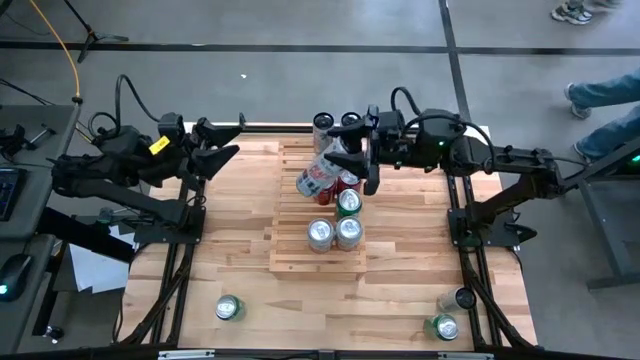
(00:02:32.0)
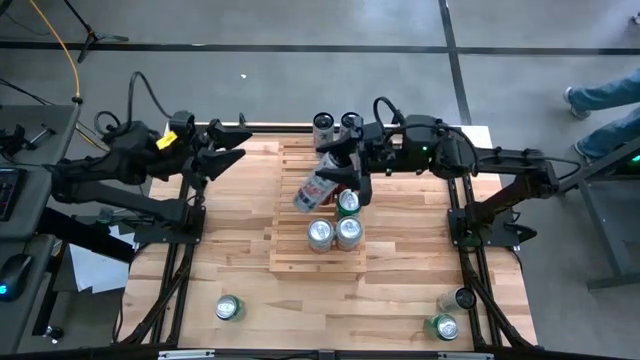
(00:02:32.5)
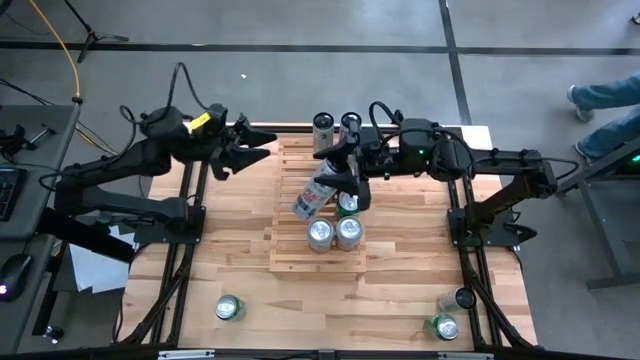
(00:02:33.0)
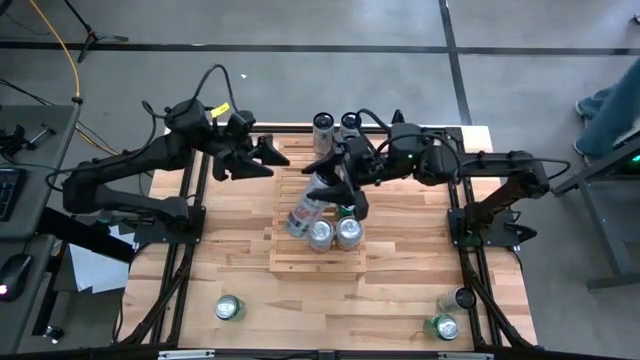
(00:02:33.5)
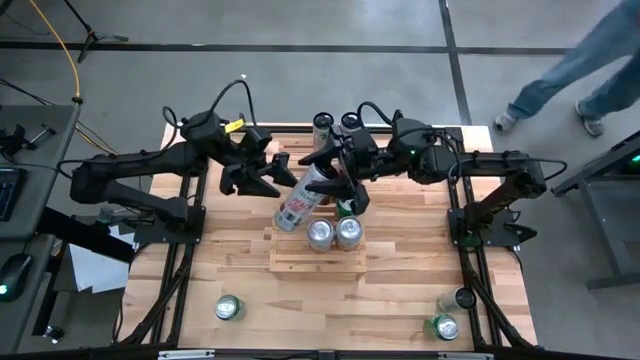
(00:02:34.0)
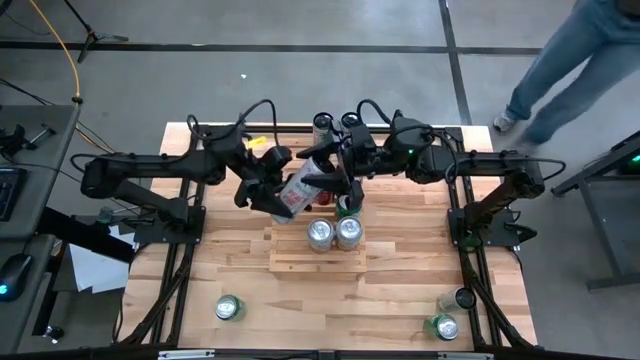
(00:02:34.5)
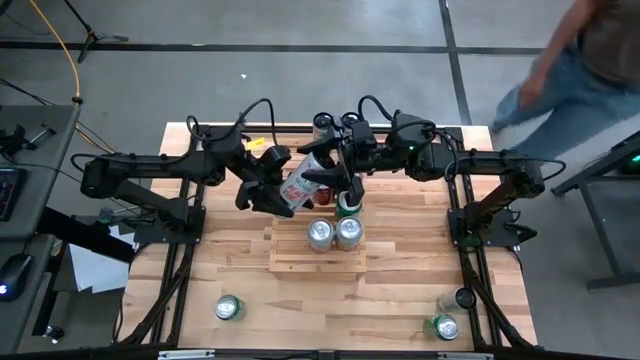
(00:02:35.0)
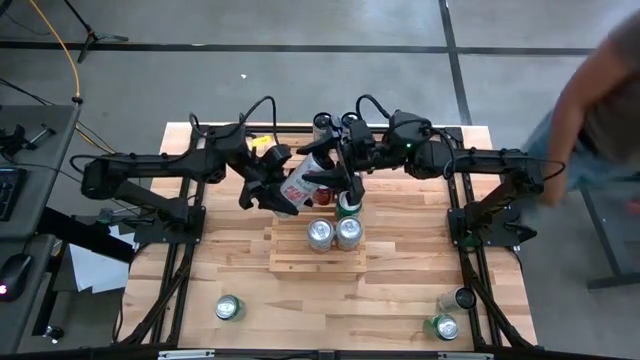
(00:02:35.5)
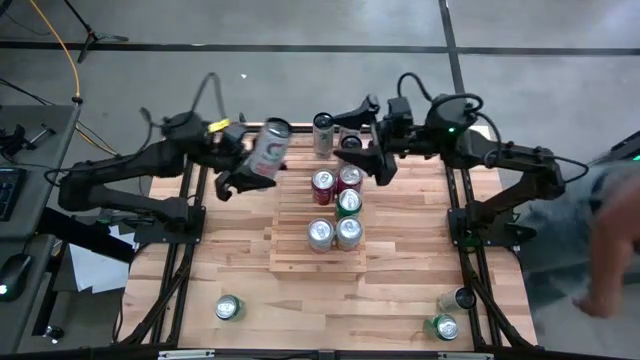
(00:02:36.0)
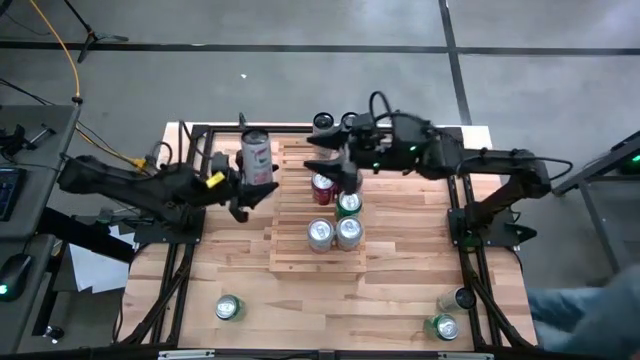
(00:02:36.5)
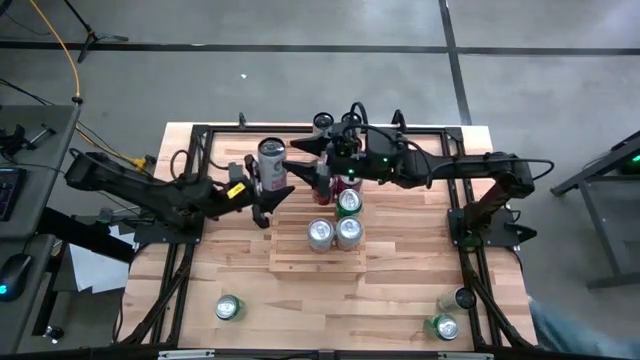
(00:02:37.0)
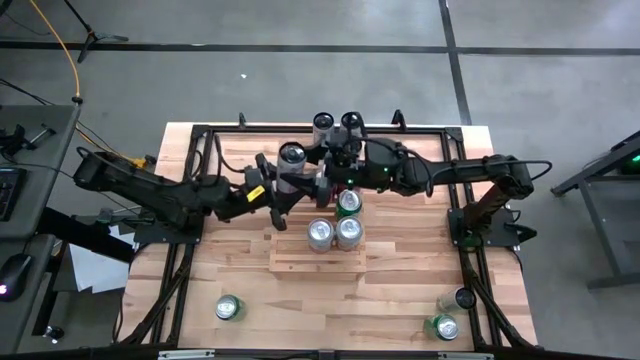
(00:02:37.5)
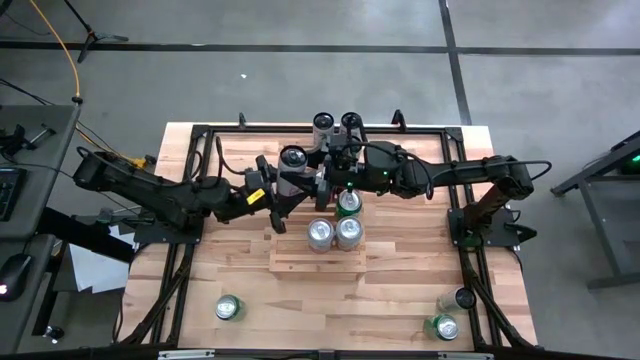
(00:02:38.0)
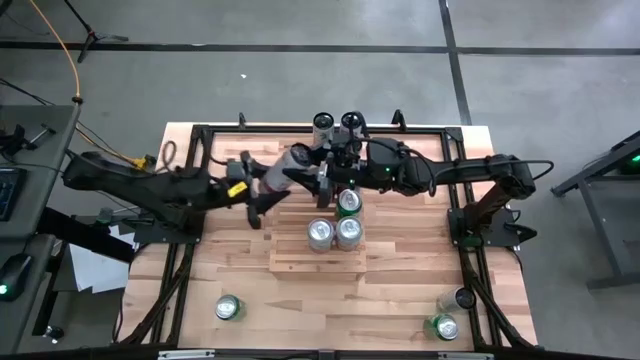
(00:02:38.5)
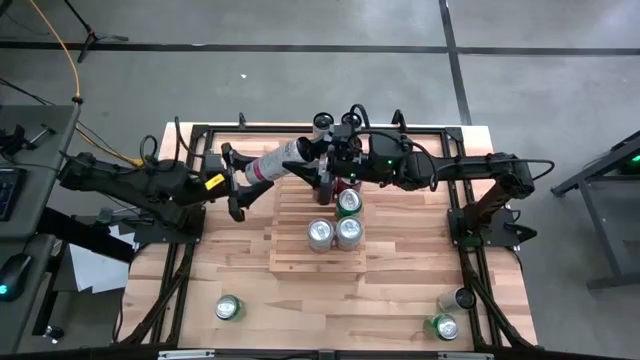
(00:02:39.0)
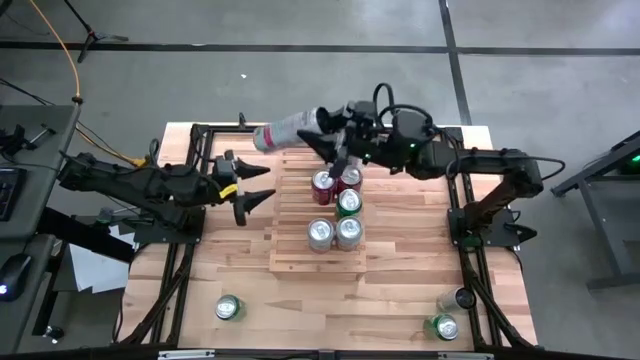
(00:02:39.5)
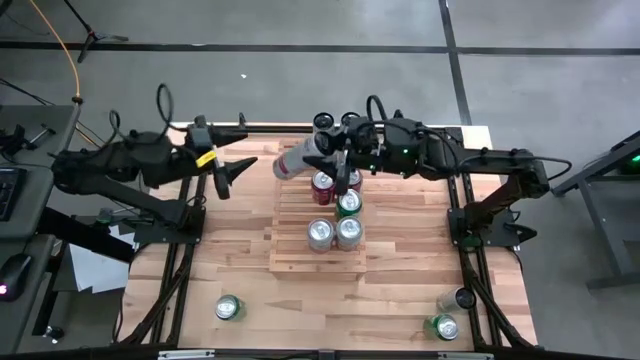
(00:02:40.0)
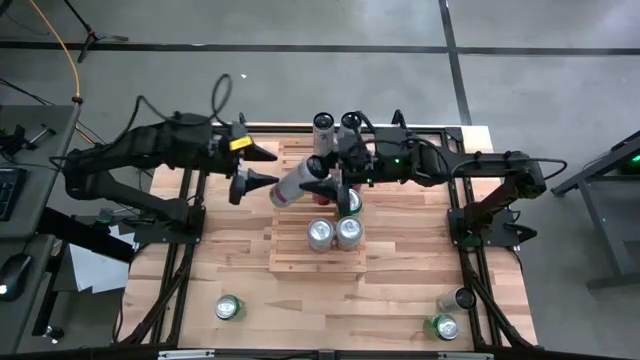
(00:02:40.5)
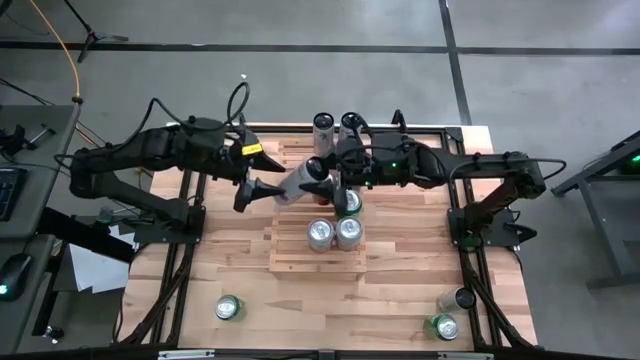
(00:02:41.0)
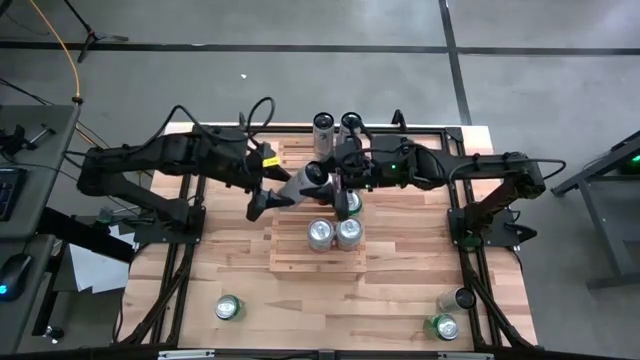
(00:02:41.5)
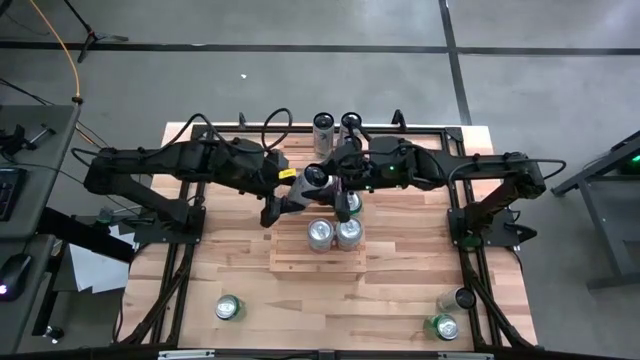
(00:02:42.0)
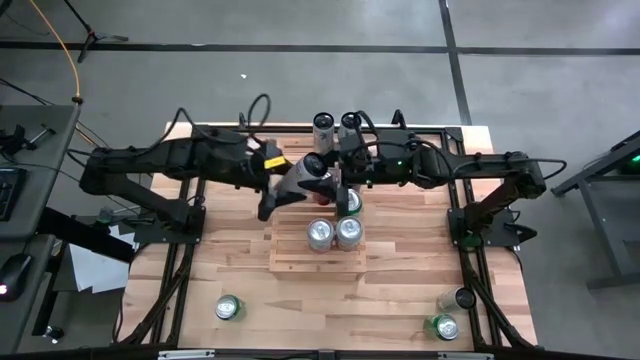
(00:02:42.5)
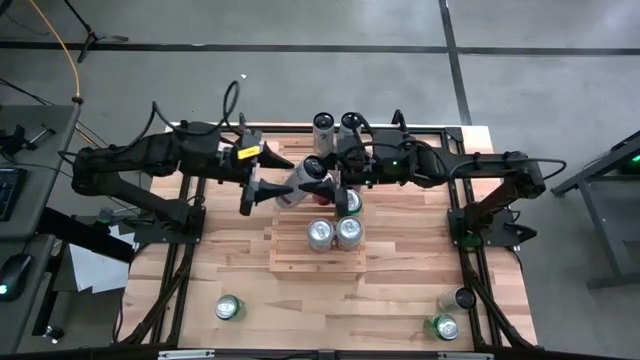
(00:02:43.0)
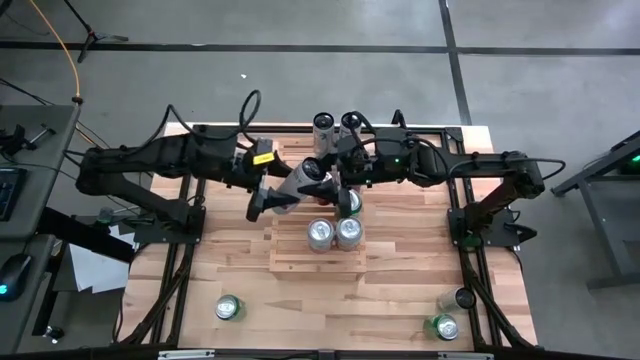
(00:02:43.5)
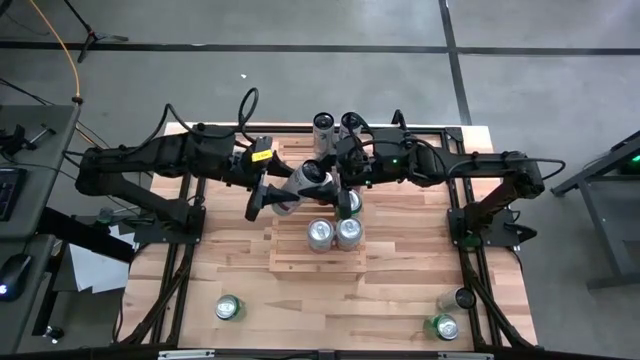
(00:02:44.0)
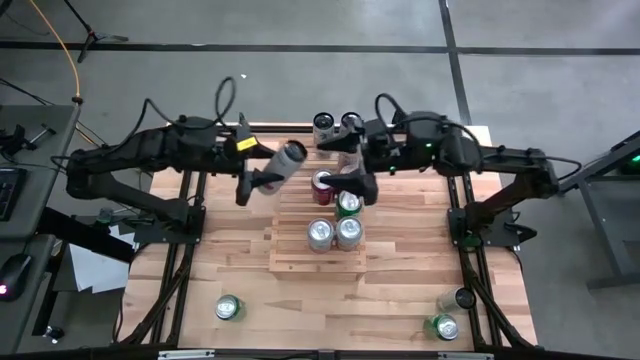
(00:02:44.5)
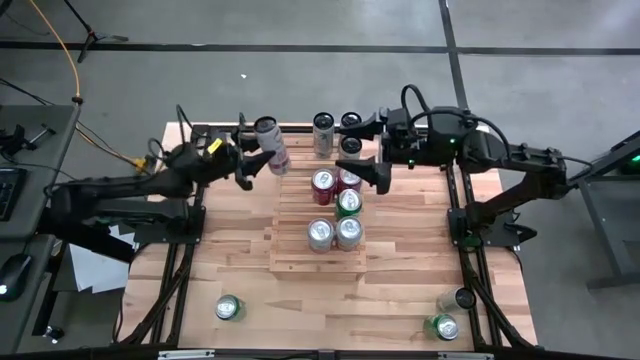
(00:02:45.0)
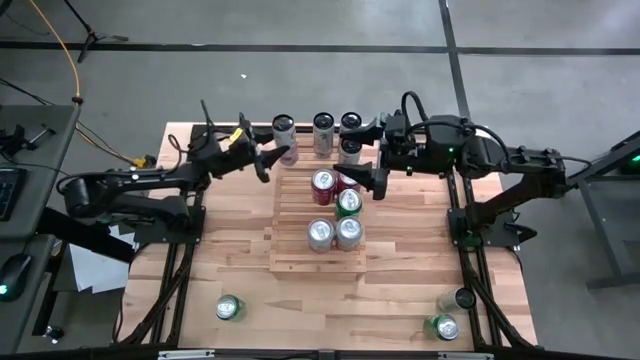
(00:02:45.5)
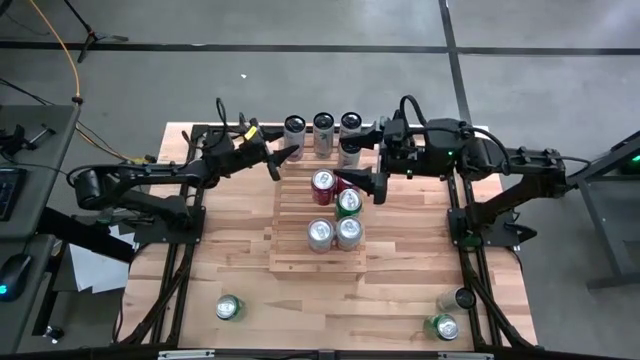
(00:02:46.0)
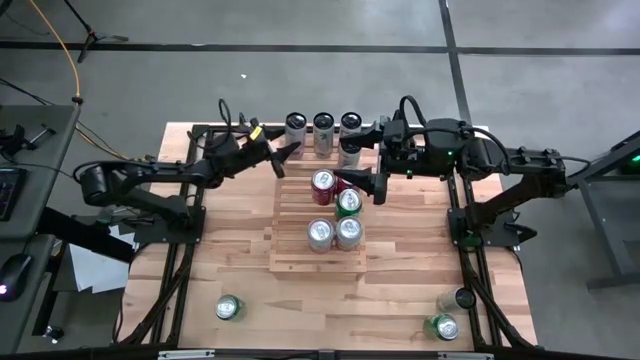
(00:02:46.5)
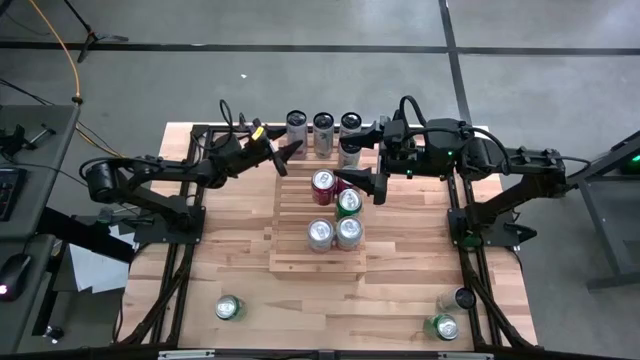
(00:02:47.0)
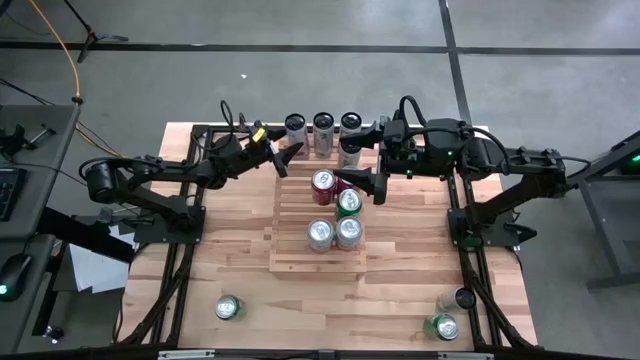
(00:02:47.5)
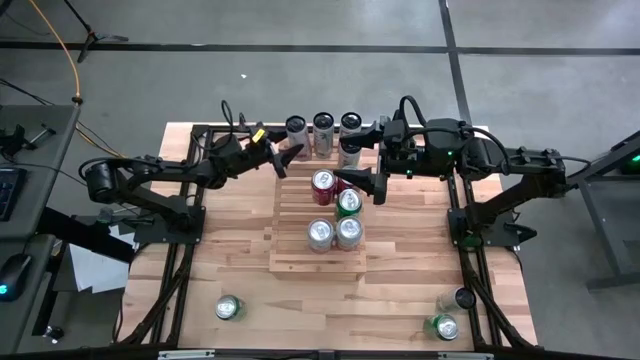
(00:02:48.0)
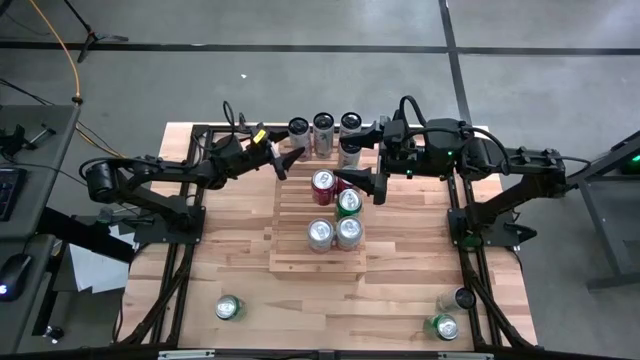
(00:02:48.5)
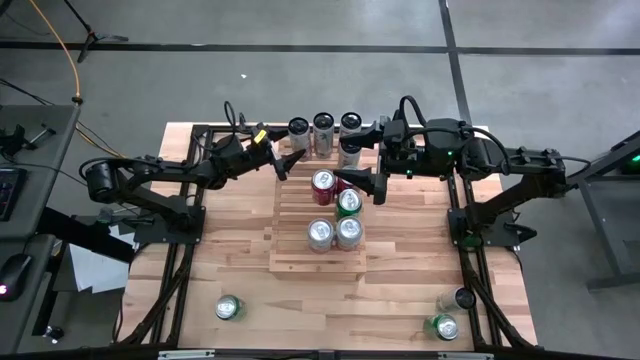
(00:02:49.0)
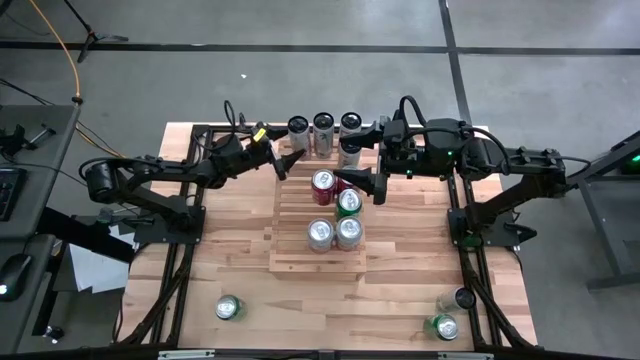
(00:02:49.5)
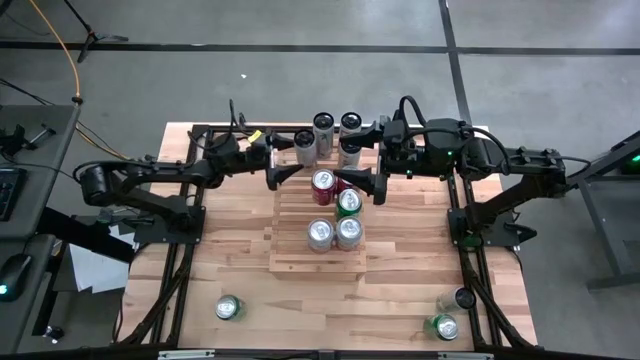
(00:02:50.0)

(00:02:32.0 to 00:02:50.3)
Task: Place canned beverage on shelf
Put the white pink can on the shelf
